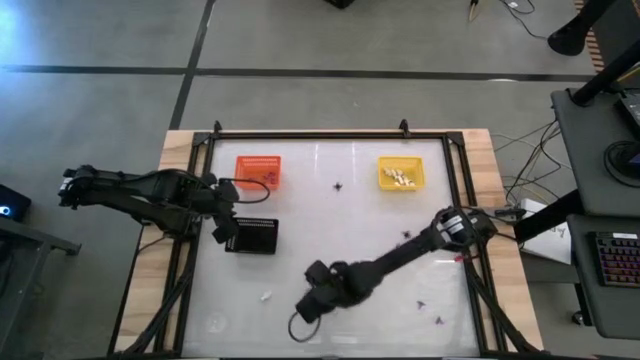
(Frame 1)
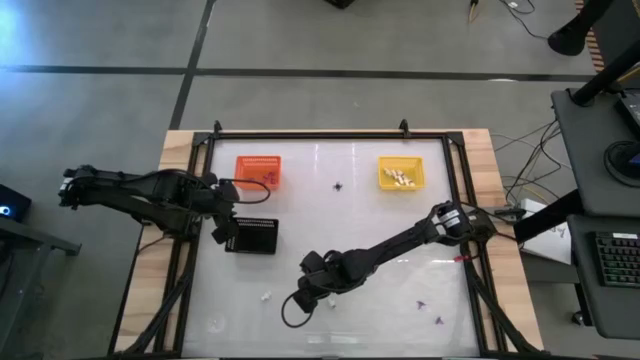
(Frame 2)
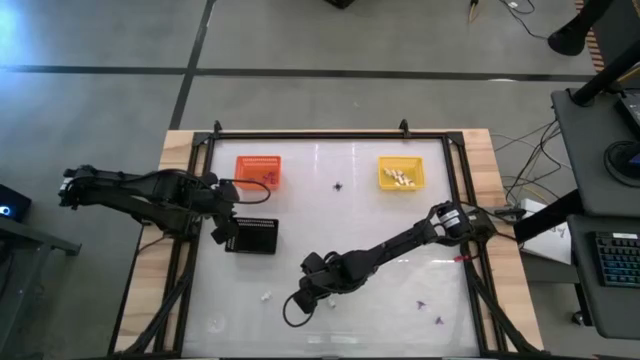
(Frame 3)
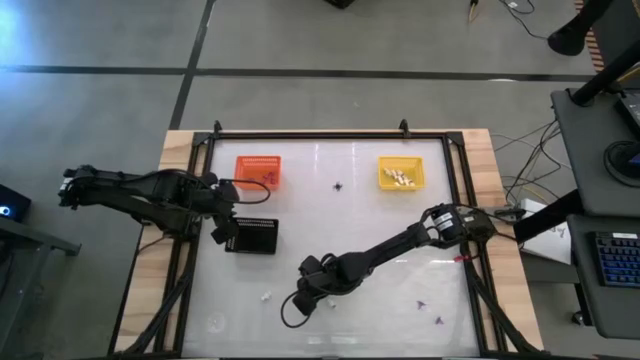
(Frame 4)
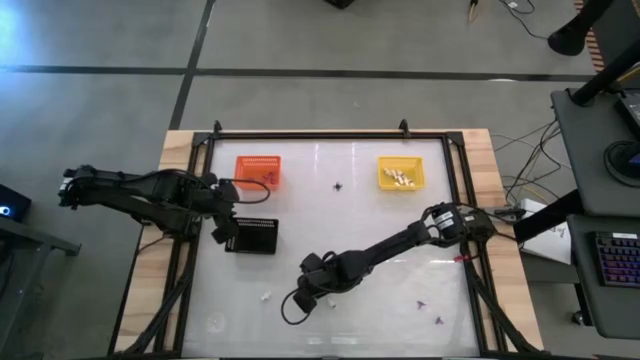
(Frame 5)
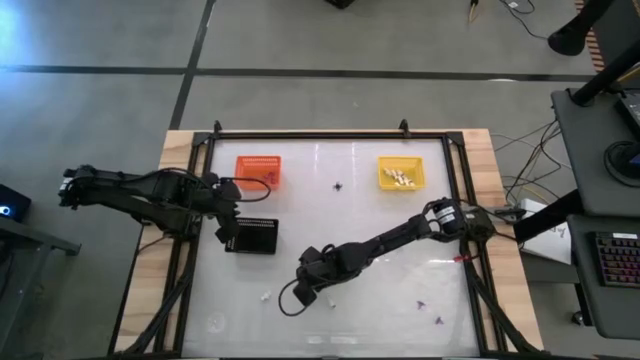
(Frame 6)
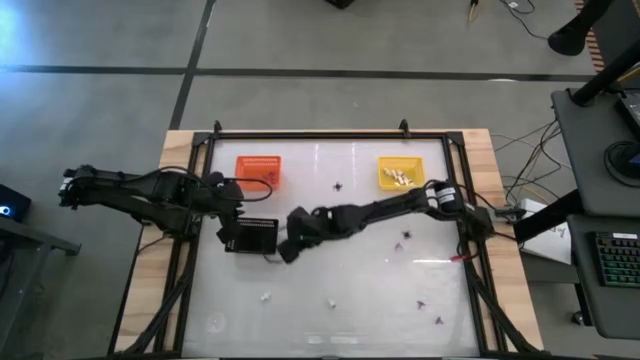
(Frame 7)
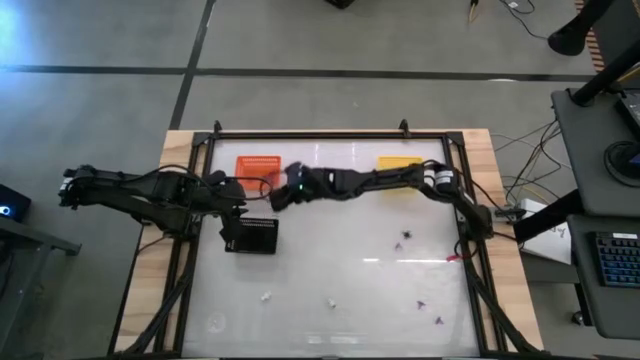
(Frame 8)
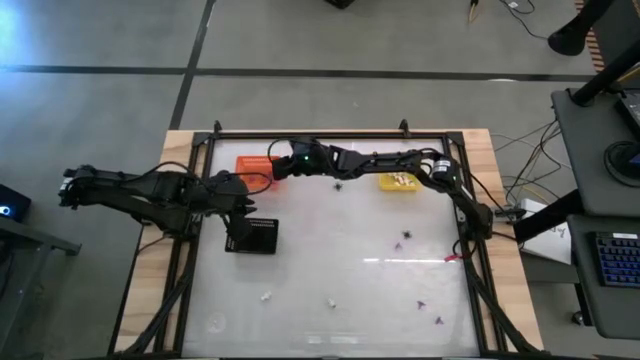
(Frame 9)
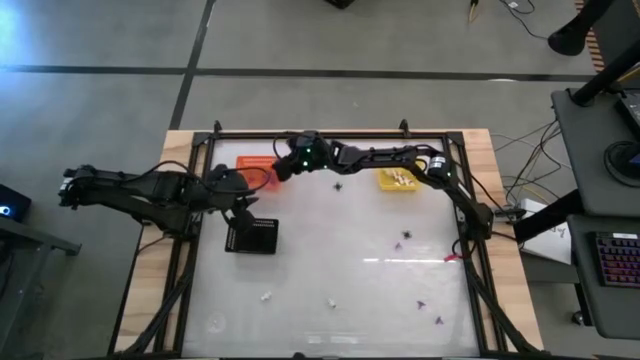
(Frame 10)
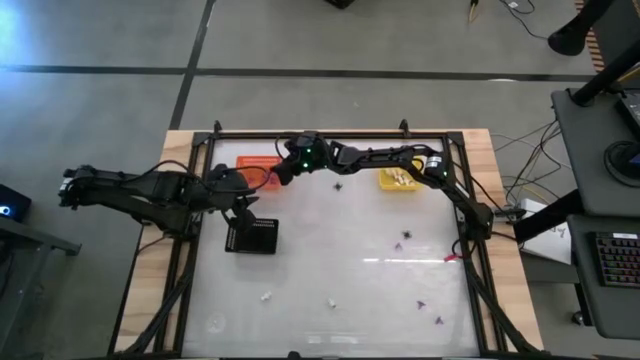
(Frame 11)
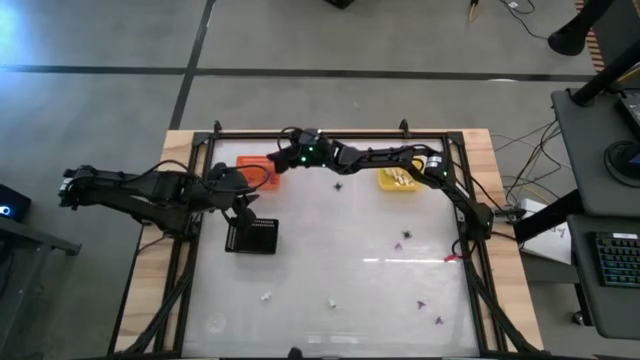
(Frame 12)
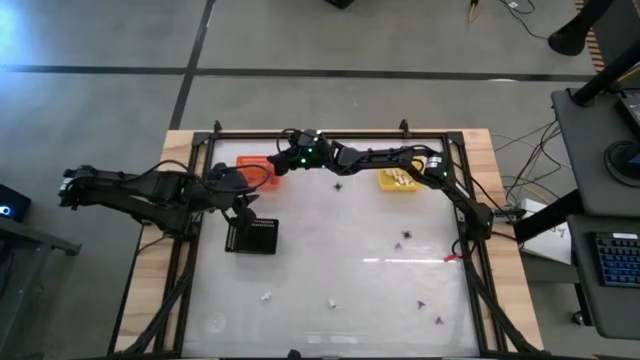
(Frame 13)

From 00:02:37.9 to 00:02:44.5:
Task: Sort Halloween decoration
Put the violet witch hat toy into the orange bin

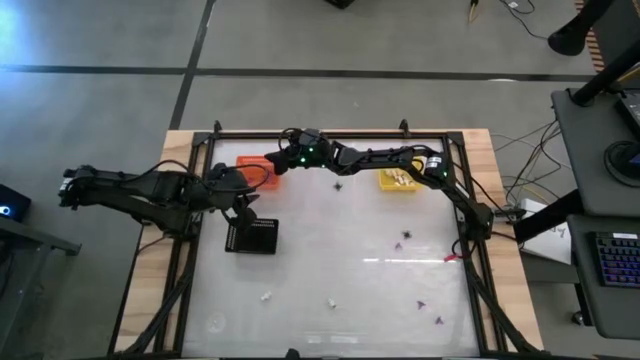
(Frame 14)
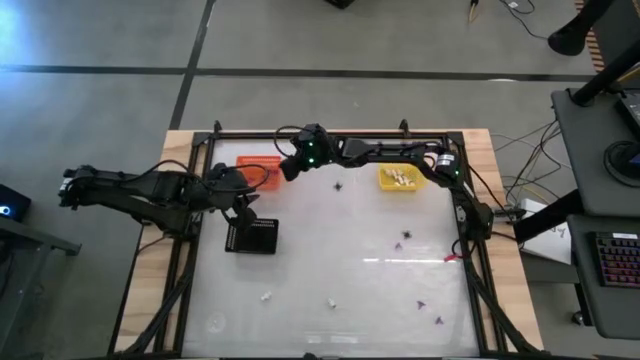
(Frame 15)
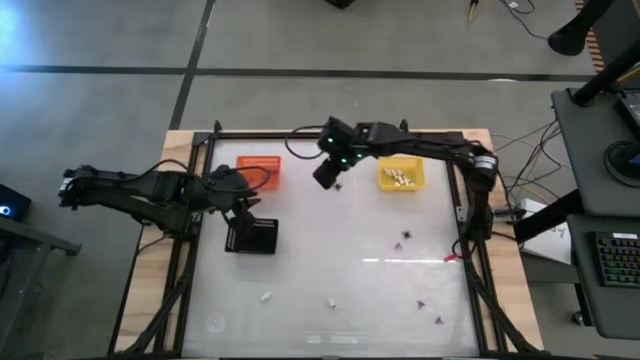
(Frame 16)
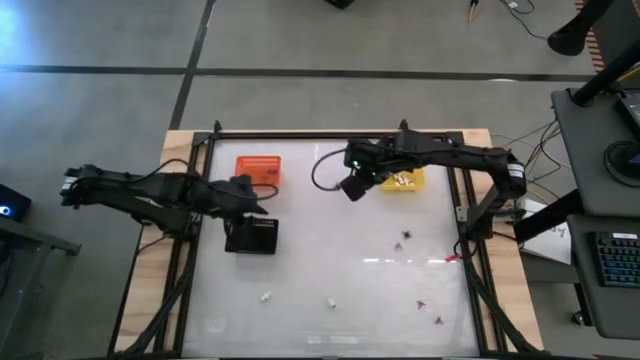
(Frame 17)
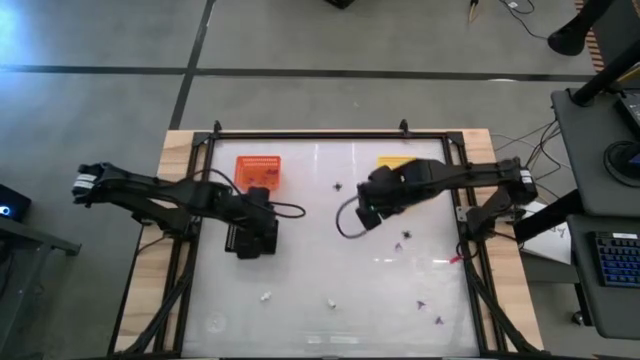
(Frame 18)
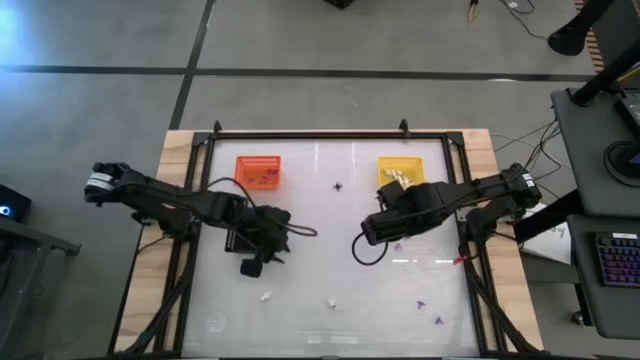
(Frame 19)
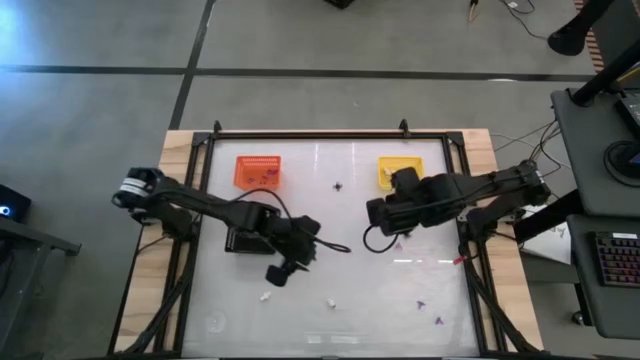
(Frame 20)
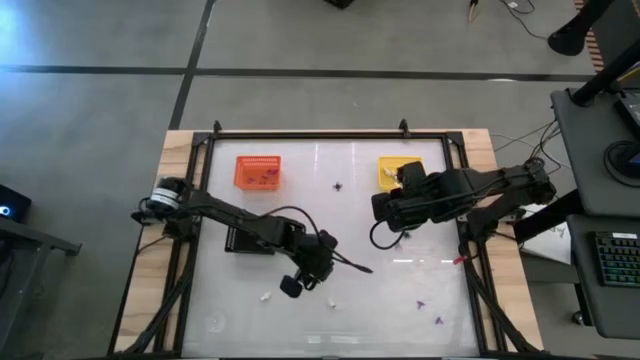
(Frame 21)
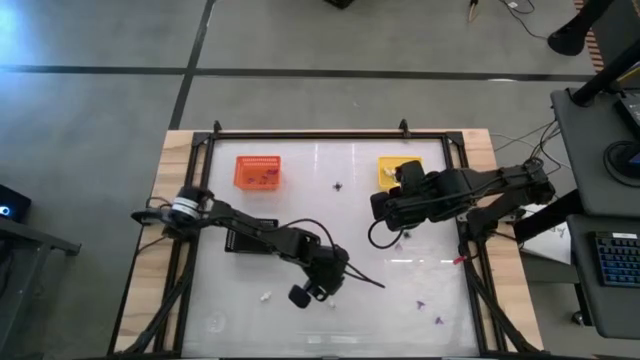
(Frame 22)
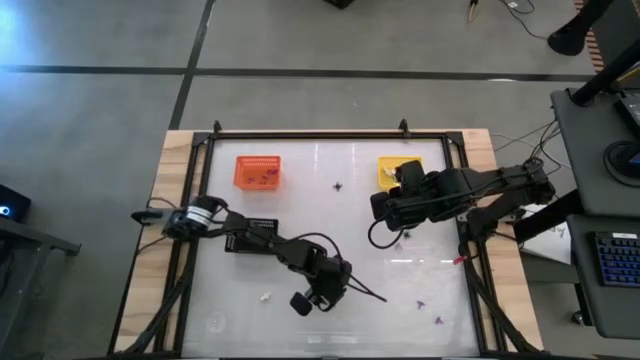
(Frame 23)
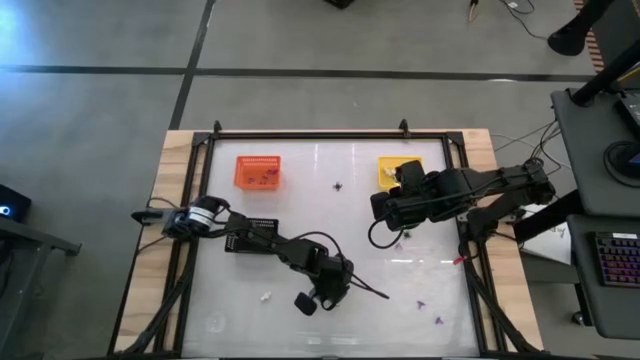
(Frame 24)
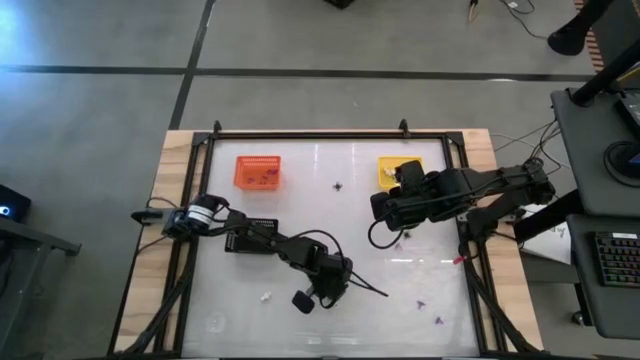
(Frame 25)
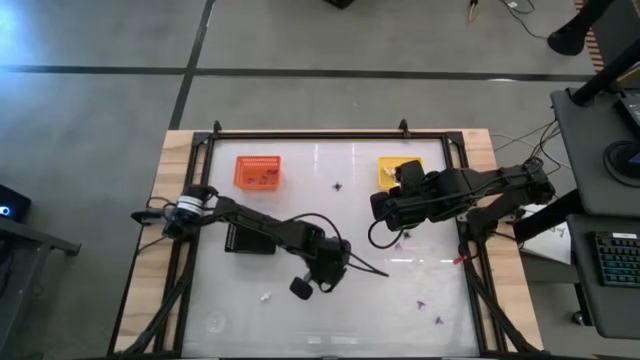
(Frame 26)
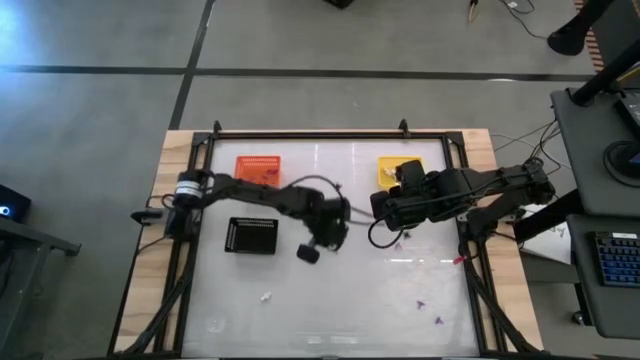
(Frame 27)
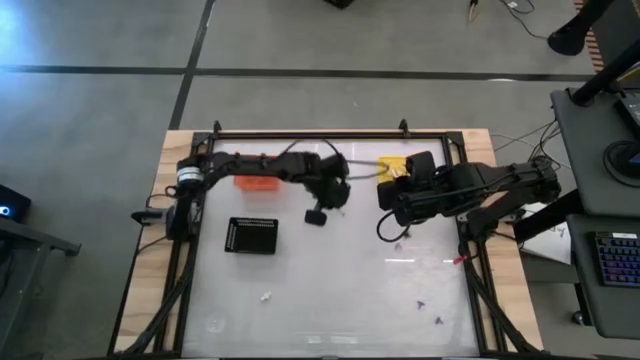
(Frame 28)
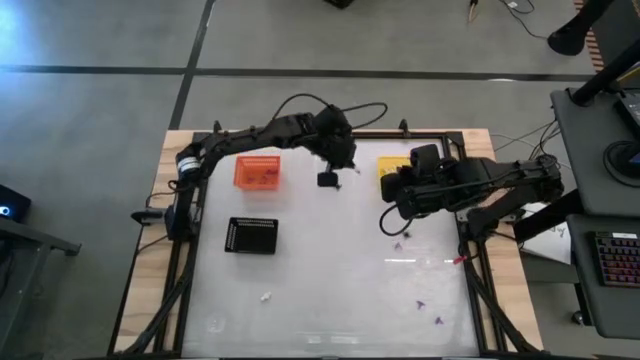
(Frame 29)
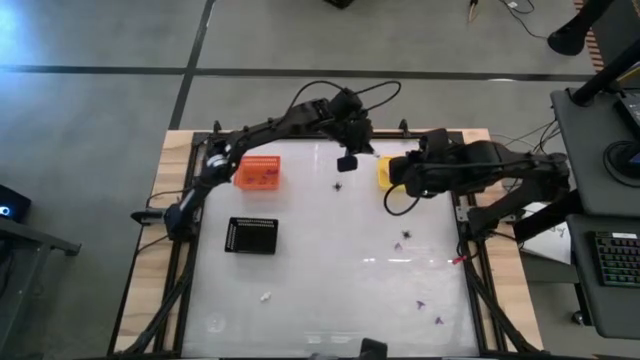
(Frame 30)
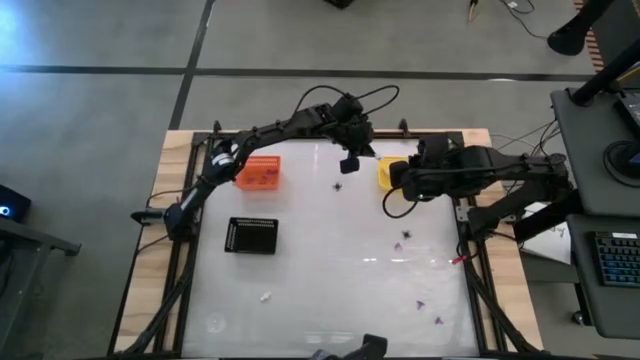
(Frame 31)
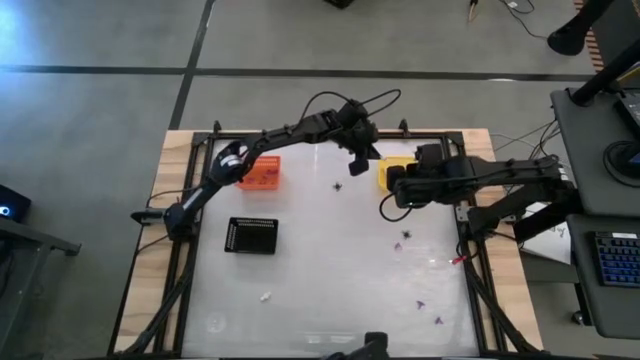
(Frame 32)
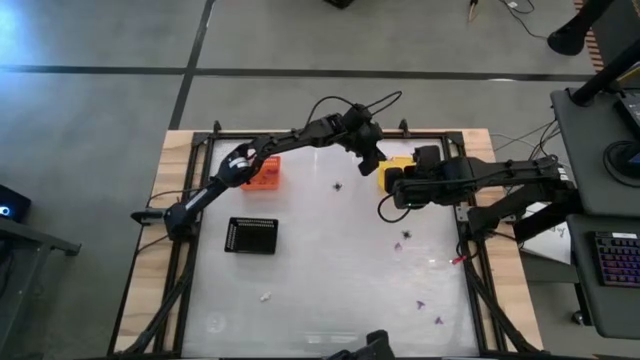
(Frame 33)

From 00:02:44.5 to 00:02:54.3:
Put the white skeleton toy into the yellow bin

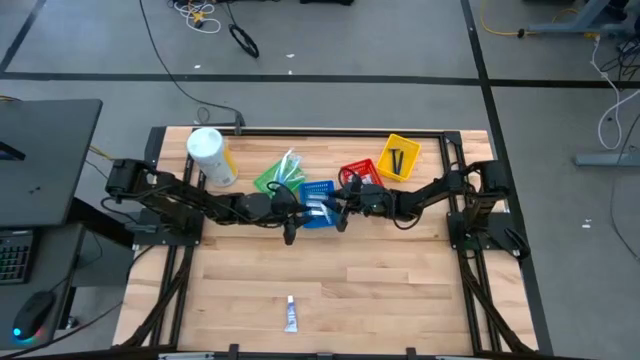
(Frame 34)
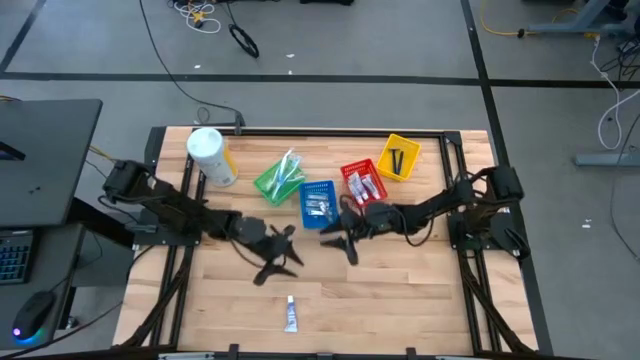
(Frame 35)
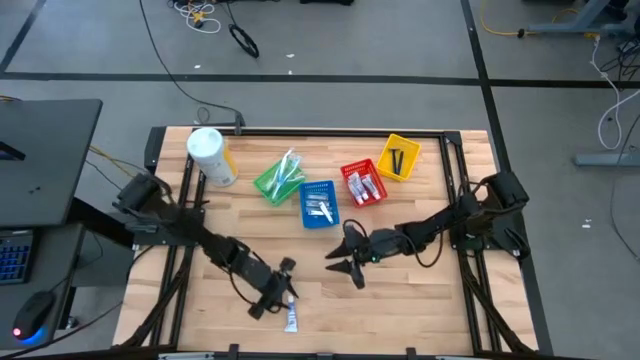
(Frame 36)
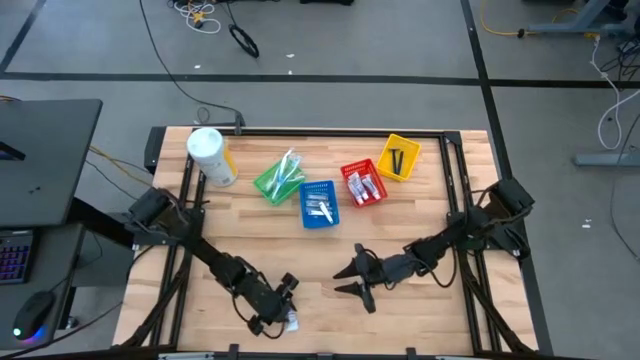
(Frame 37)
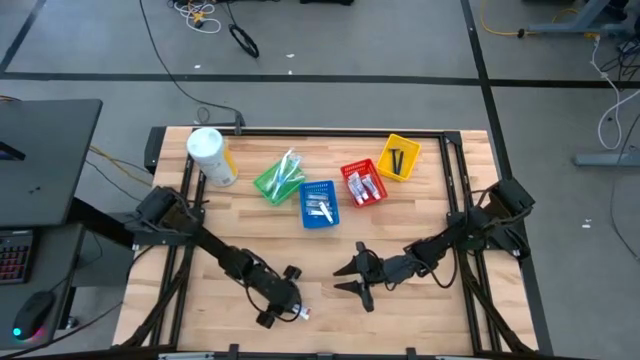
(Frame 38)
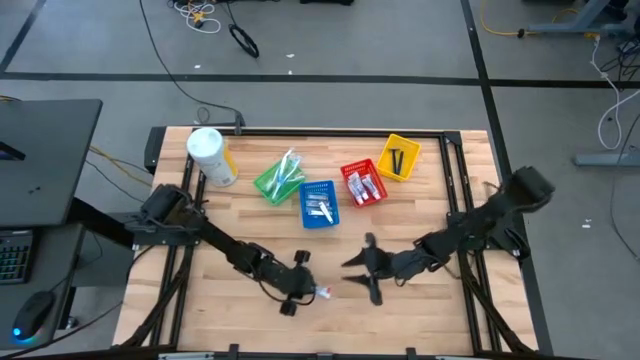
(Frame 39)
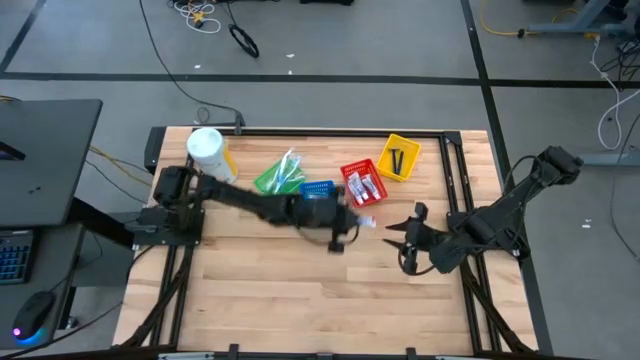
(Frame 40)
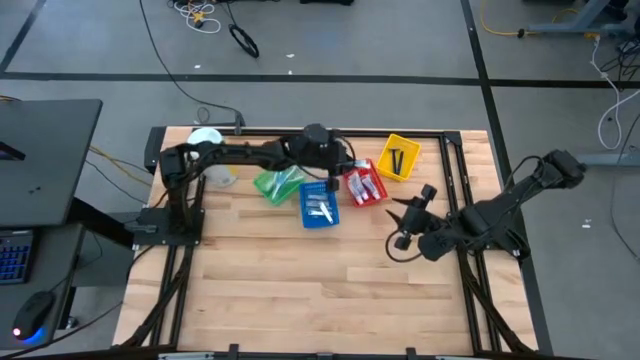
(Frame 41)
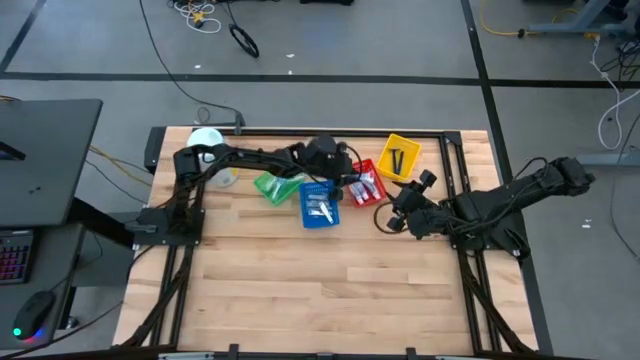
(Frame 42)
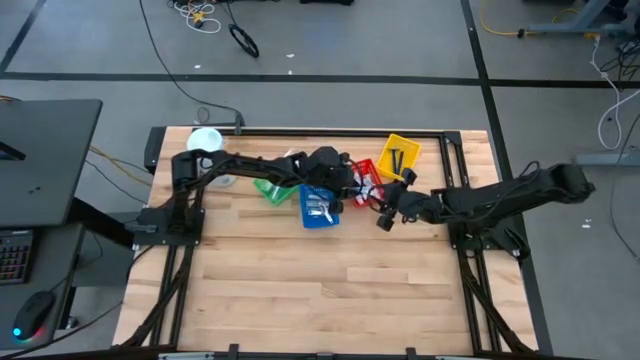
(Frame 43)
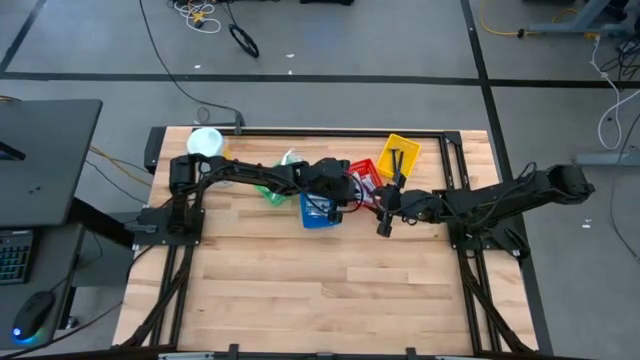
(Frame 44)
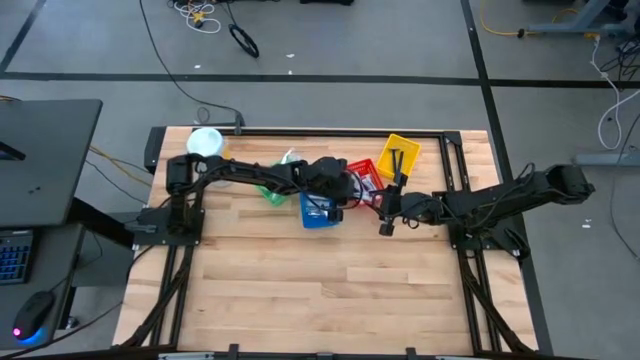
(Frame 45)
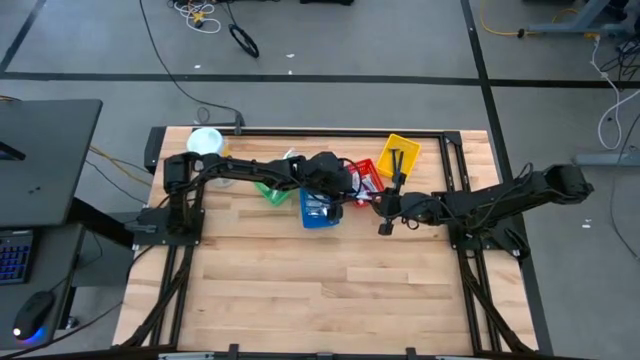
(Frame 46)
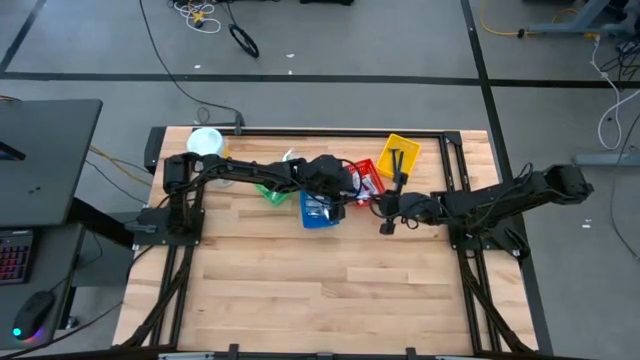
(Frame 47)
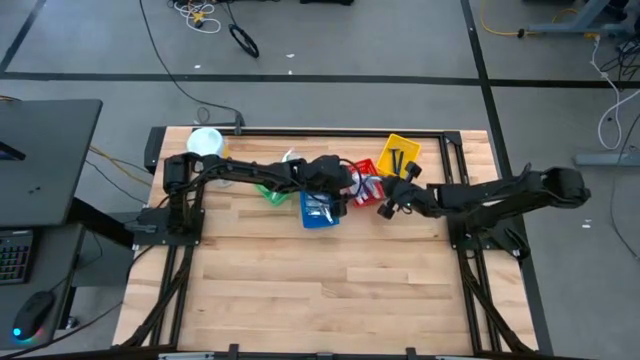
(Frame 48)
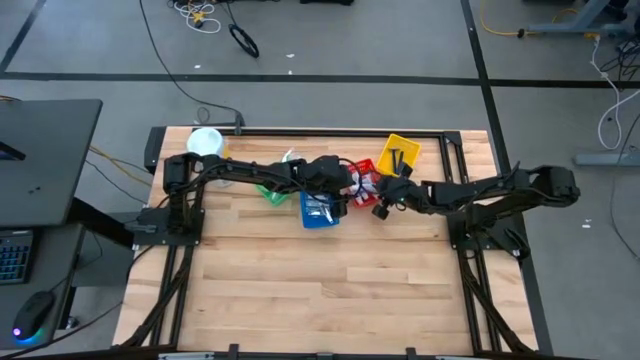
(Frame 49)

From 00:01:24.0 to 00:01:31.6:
Task: Pick & Place Travel size toiletries
Put the toothpaste into the red bin
